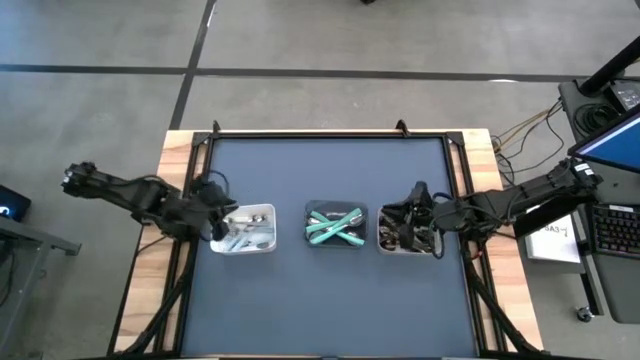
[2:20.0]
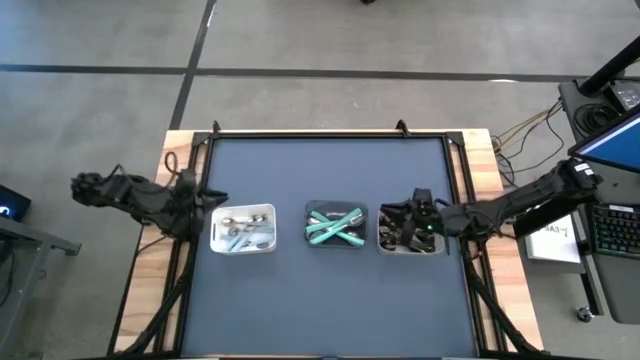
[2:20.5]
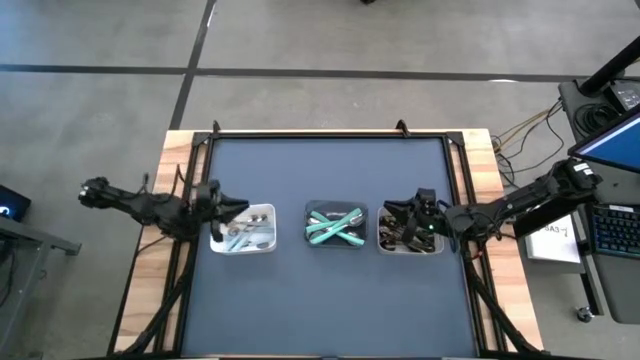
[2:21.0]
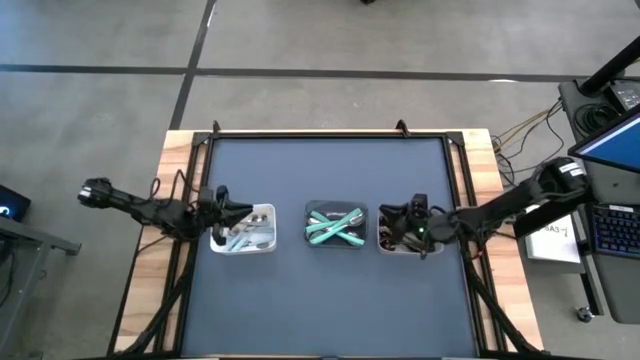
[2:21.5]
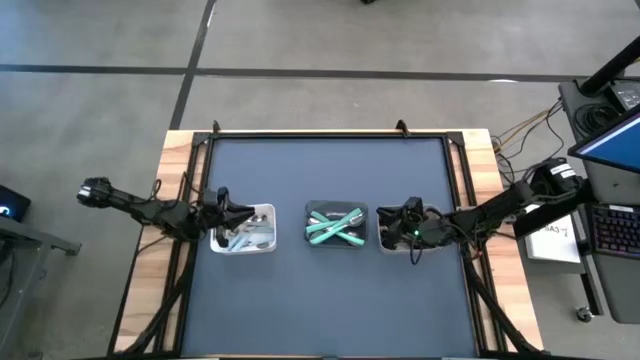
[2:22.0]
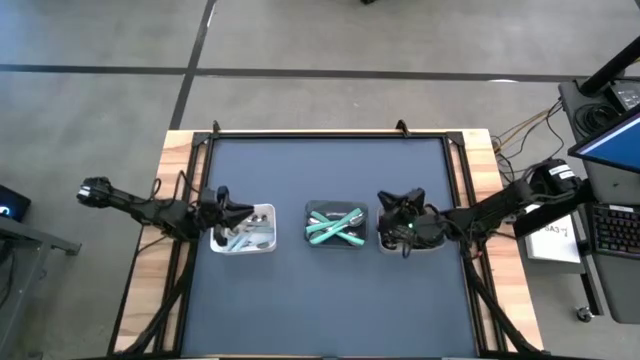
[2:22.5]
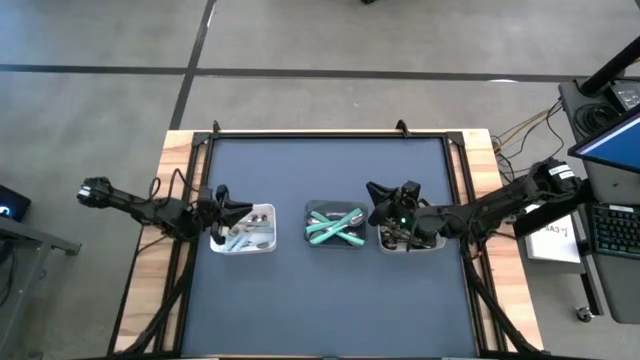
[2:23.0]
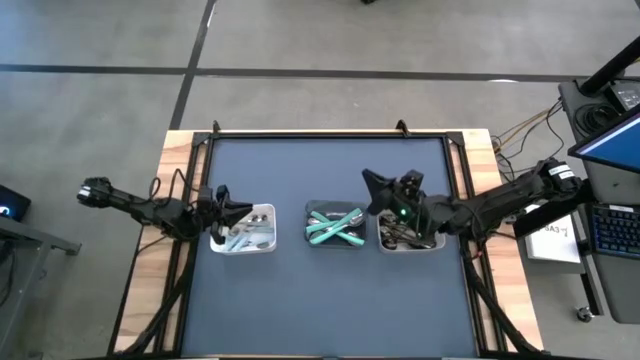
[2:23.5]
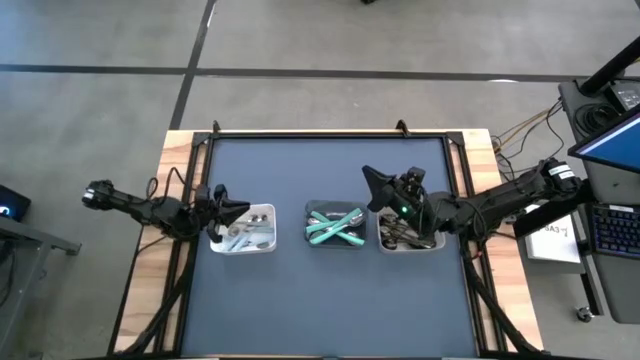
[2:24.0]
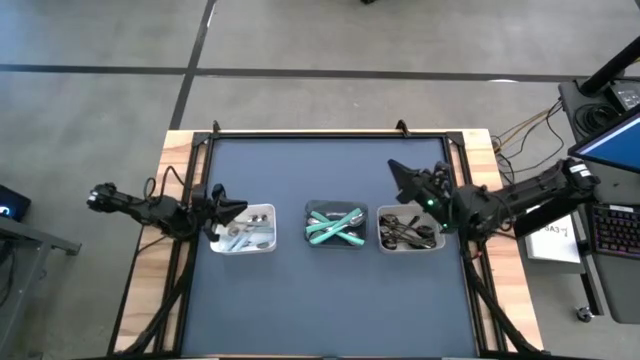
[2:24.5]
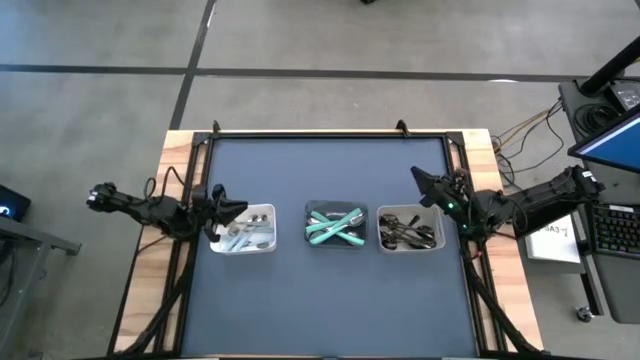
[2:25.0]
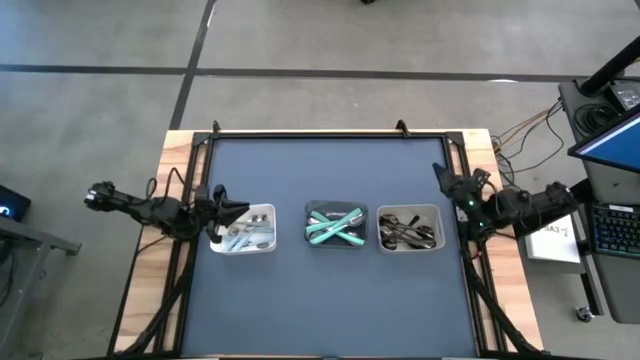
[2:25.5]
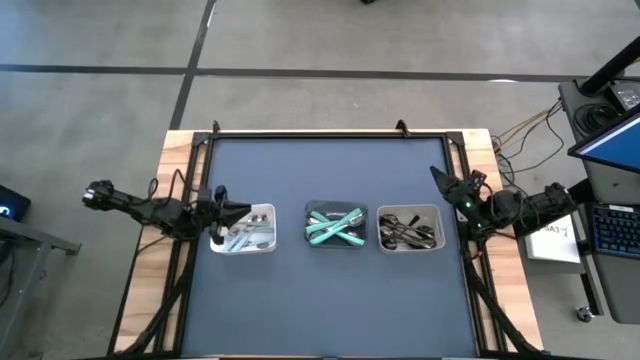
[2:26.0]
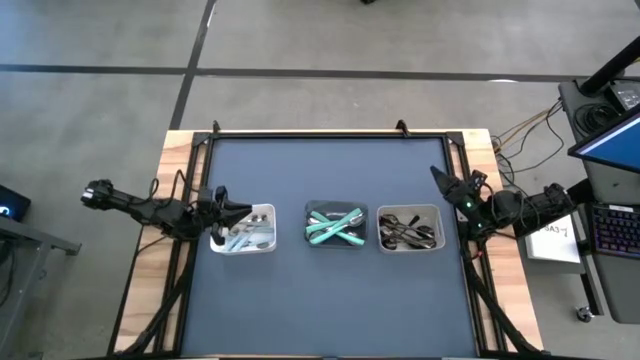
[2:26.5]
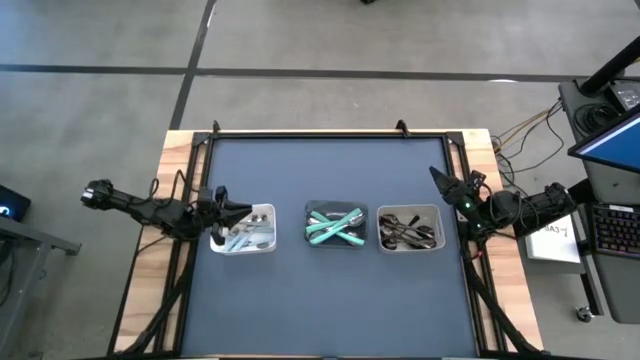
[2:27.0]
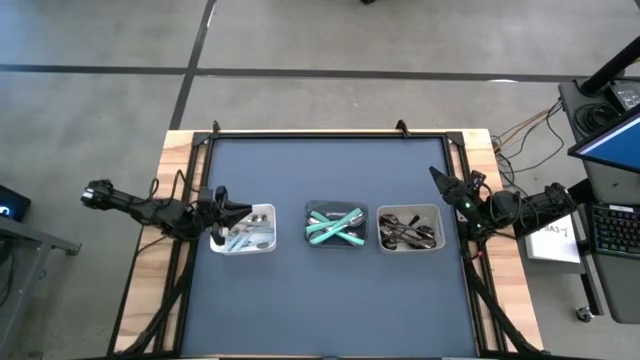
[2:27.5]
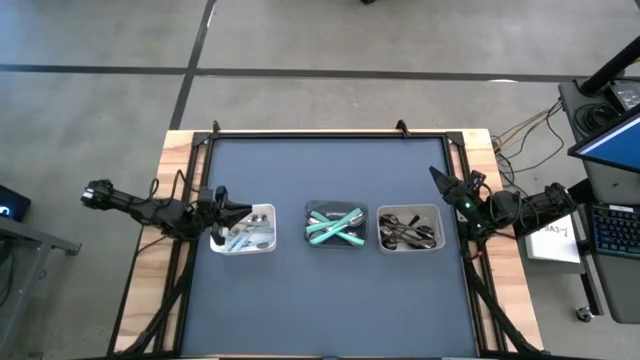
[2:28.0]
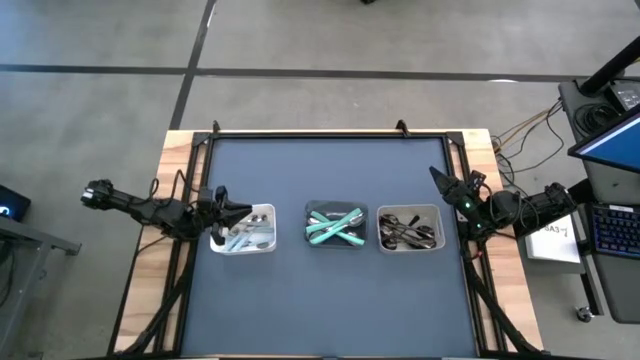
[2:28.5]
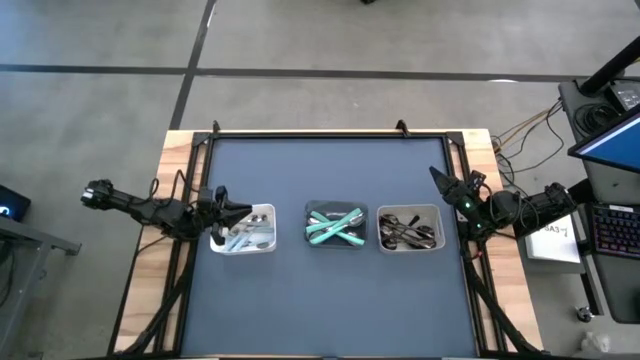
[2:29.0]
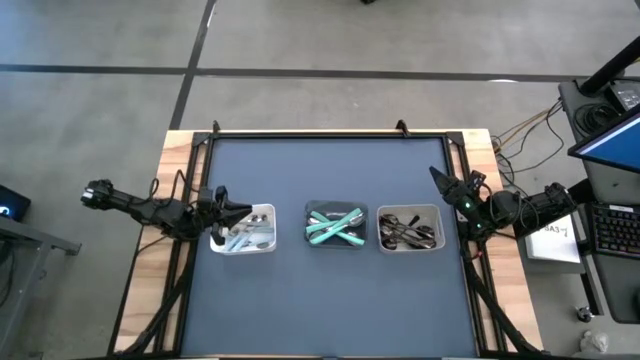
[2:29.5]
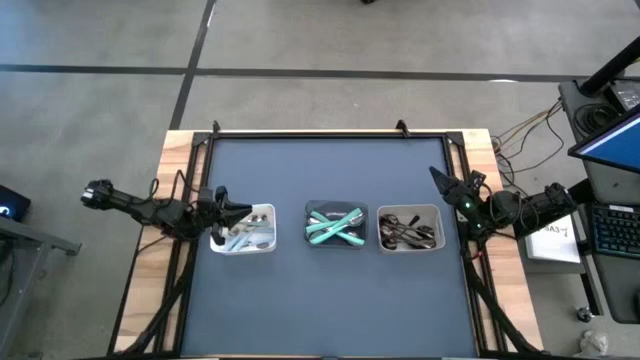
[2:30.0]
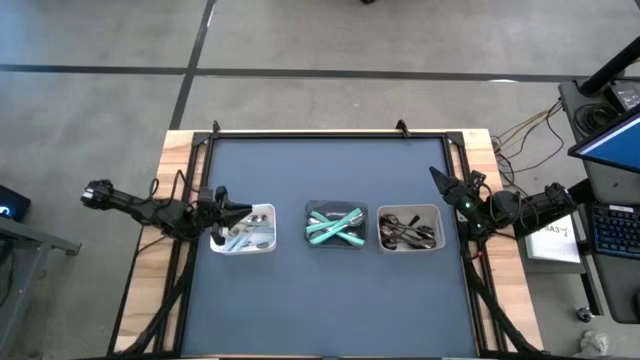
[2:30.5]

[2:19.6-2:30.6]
Task: Sort silverware by color (type)
Return to Home Position

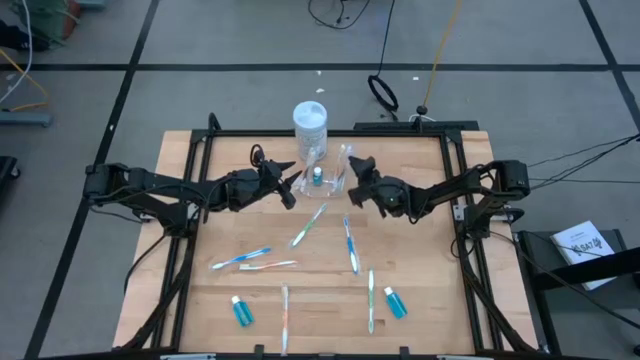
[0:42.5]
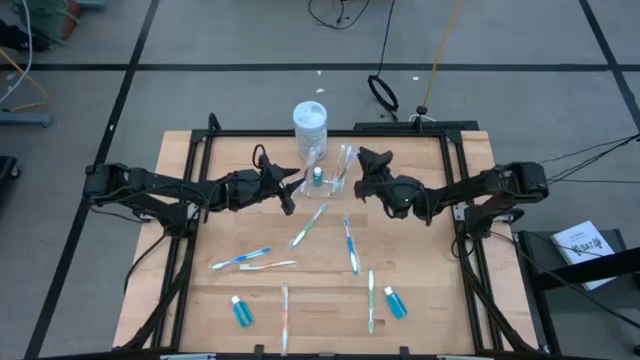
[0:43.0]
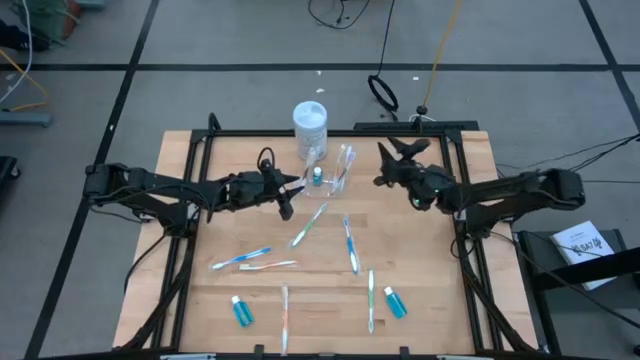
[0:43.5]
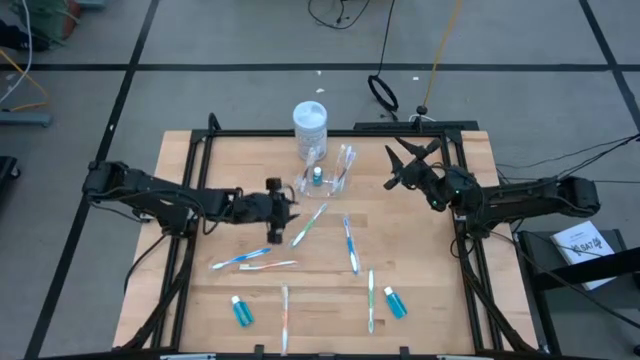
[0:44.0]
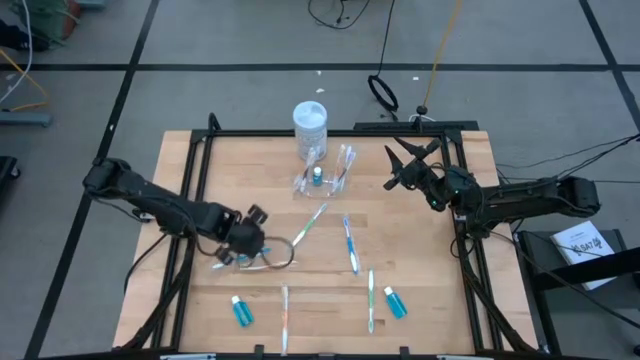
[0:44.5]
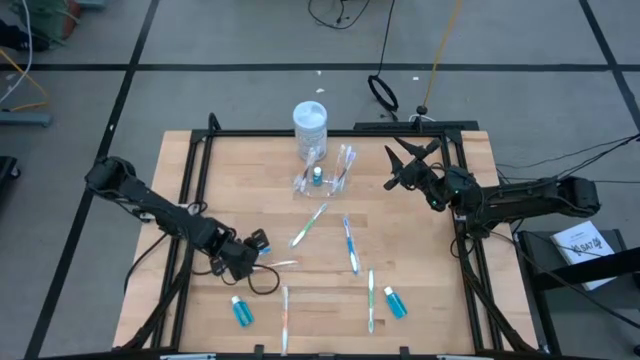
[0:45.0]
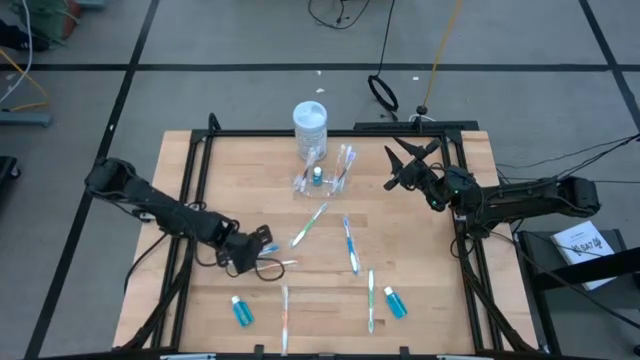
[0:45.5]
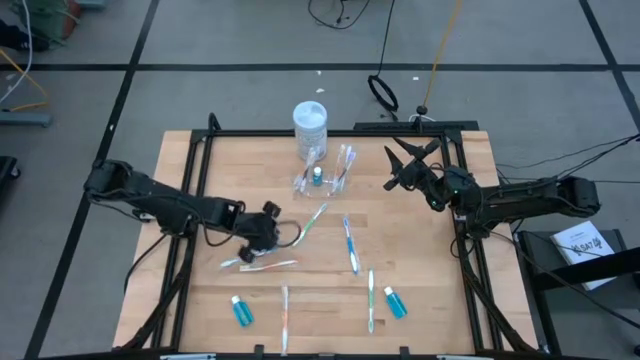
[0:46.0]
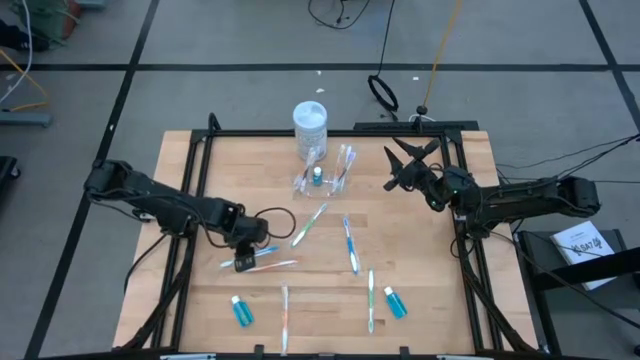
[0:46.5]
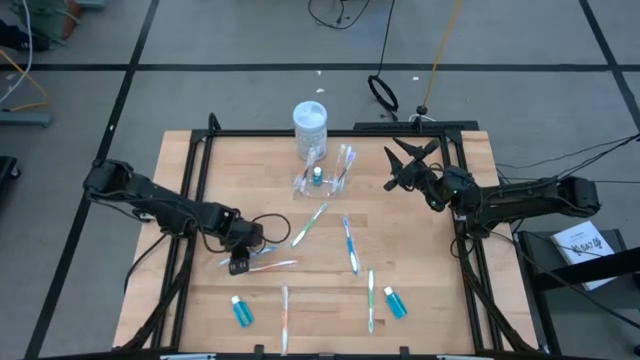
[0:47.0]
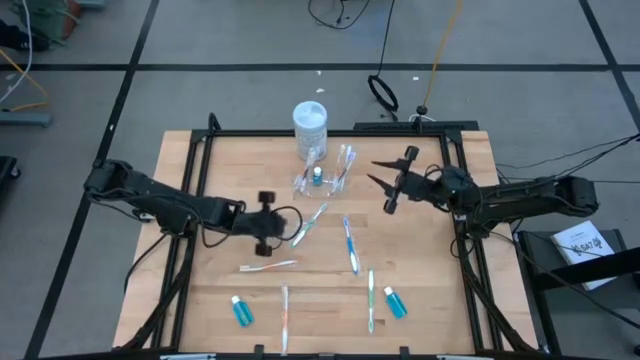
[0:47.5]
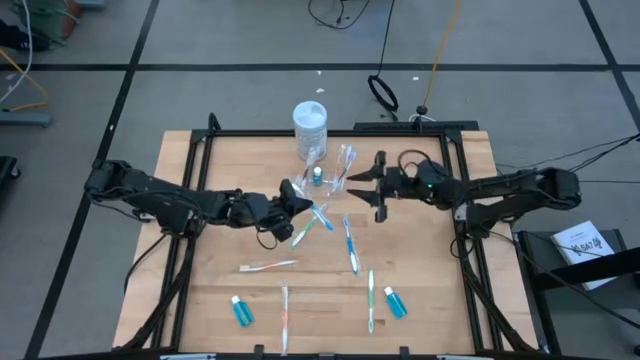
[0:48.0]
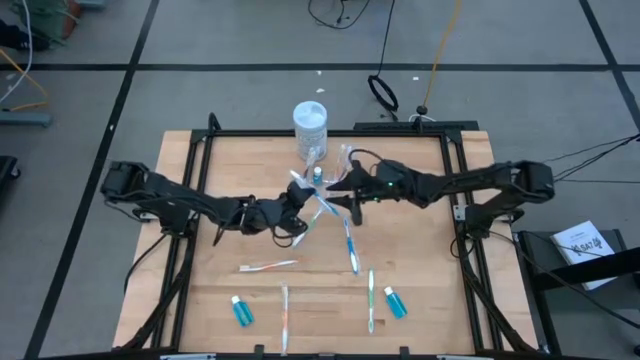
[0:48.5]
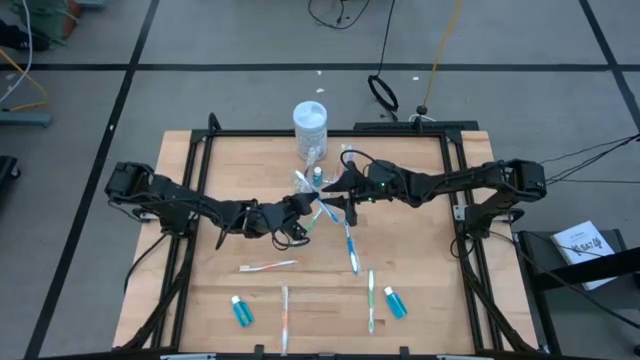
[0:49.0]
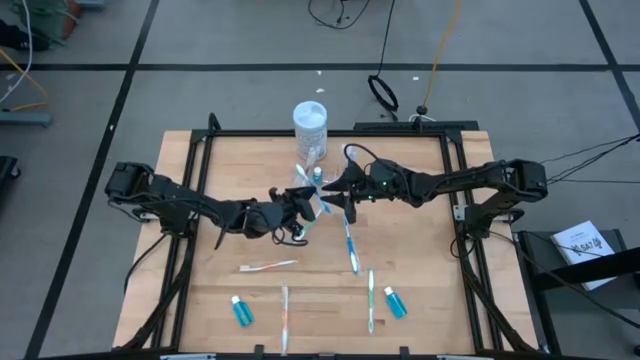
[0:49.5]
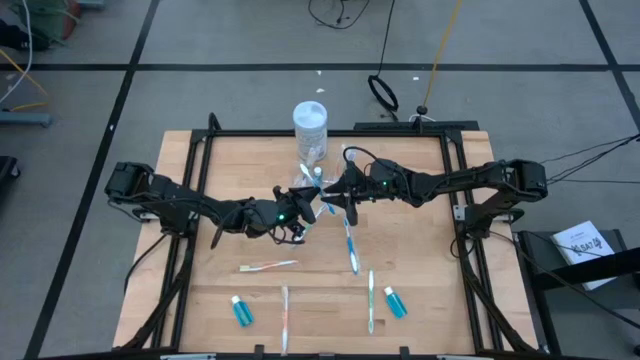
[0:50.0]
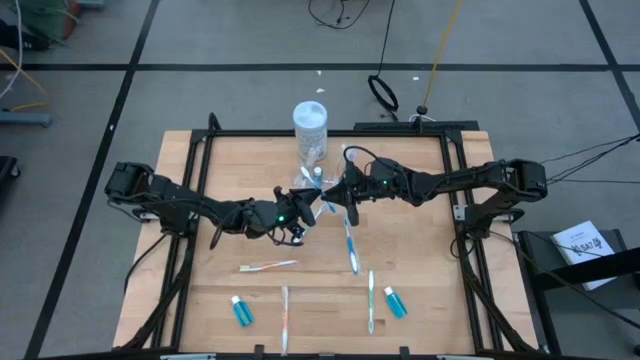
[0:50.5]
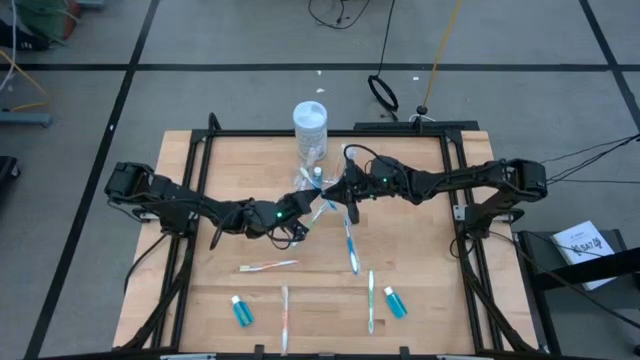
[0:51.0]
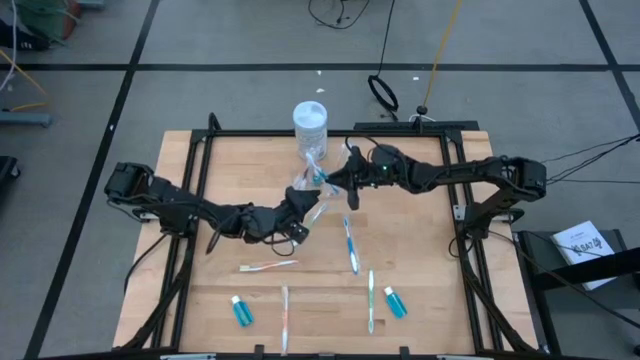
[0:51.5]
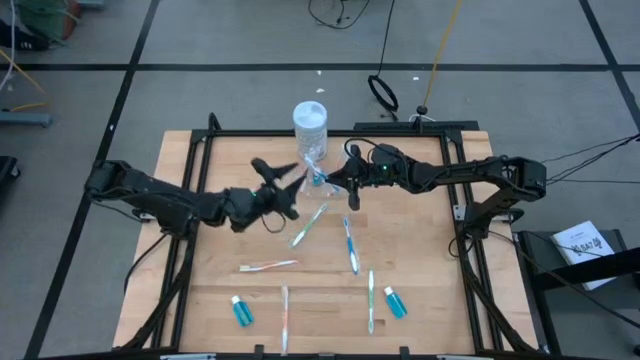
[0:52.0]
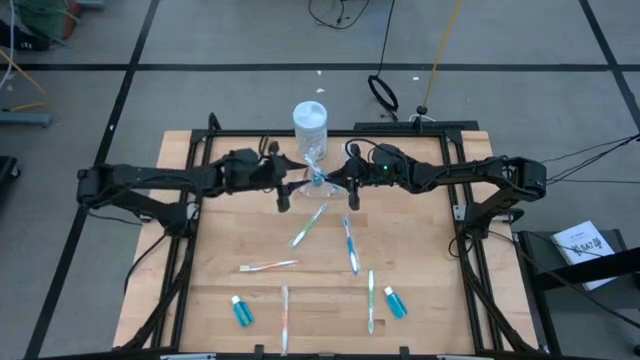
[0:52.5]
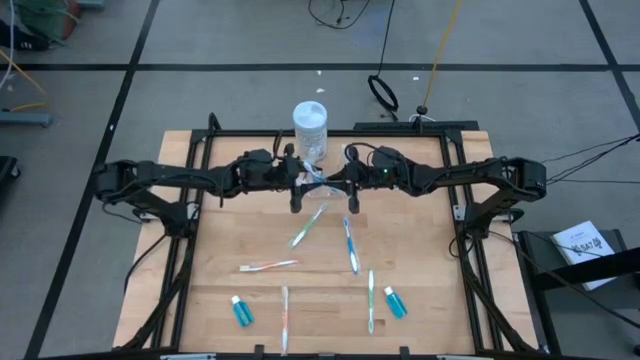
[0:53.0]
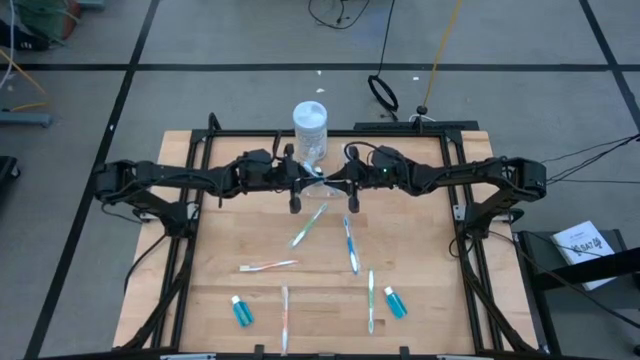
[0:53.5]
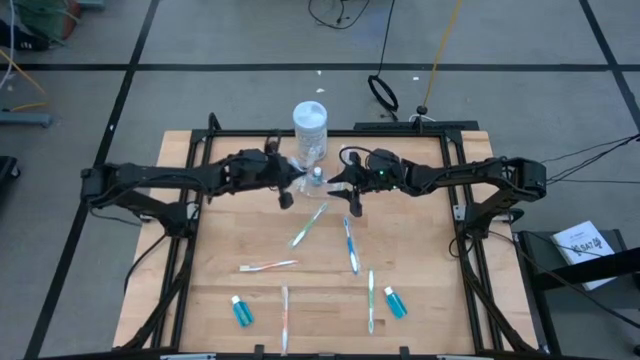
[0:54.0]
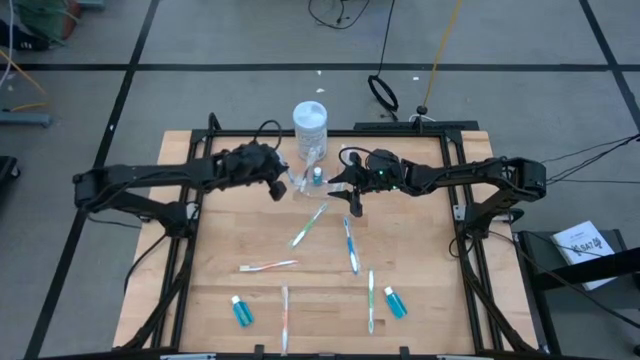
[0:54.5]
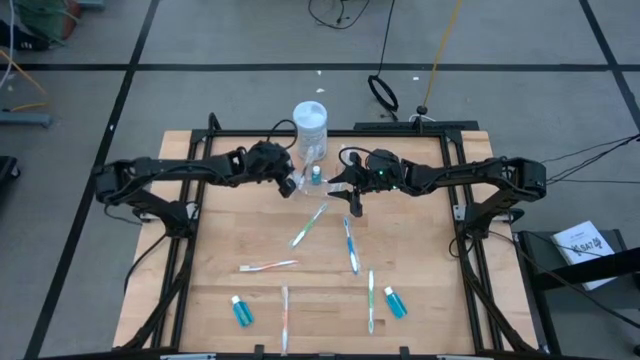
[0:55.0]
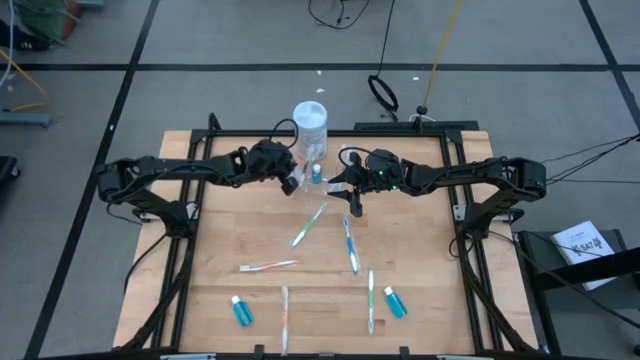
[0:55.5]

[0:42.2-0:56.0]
Task: Pick & Place toothbrushing station
Put the blue toothbrush into the transparent organizer
